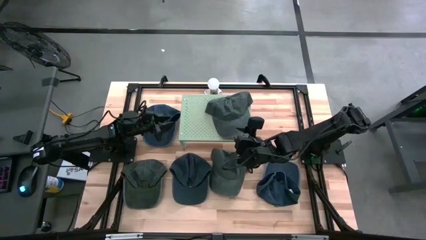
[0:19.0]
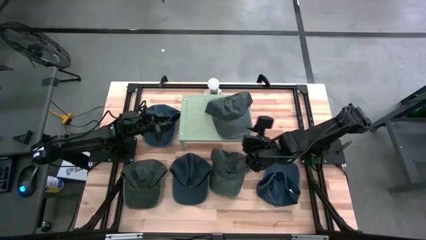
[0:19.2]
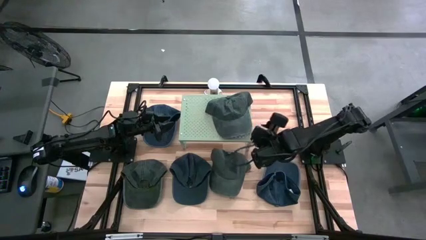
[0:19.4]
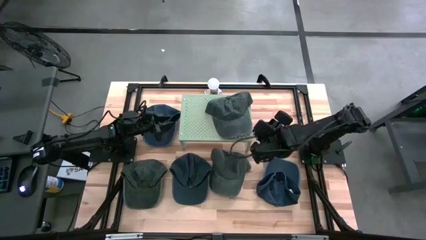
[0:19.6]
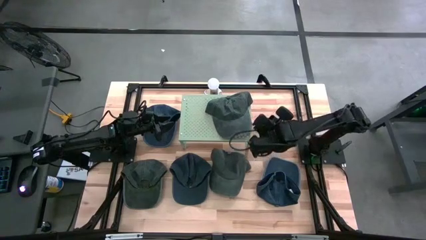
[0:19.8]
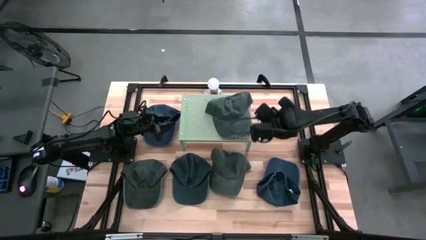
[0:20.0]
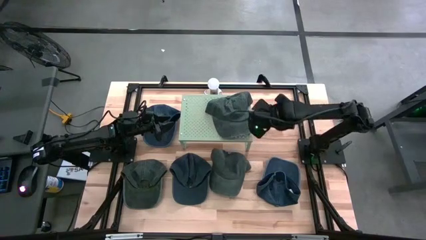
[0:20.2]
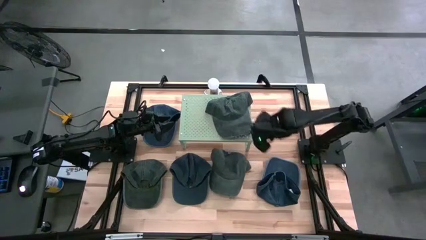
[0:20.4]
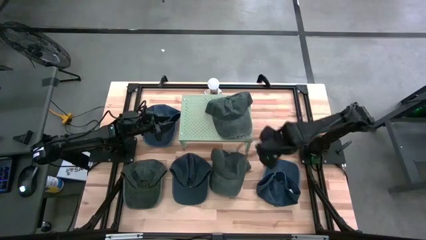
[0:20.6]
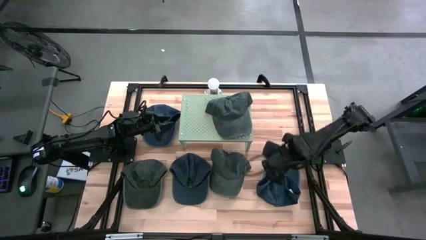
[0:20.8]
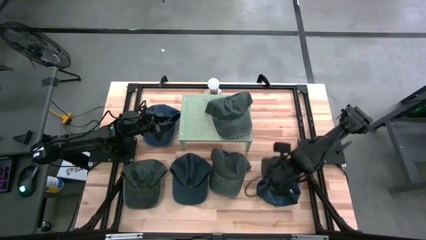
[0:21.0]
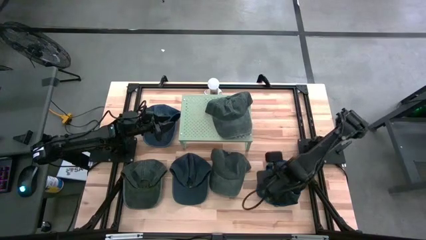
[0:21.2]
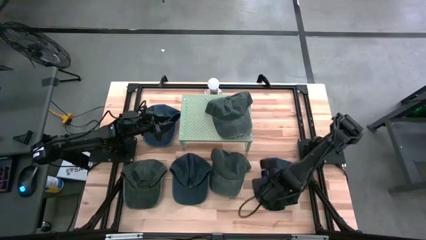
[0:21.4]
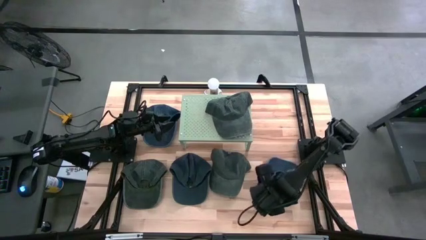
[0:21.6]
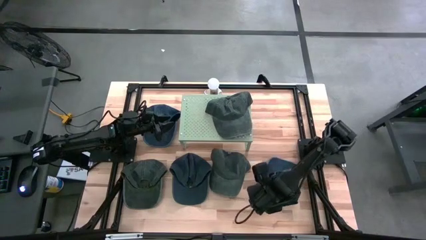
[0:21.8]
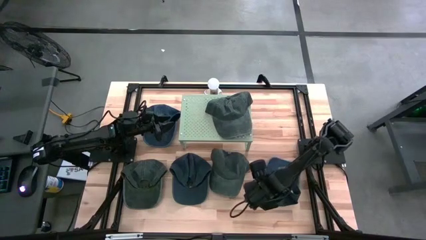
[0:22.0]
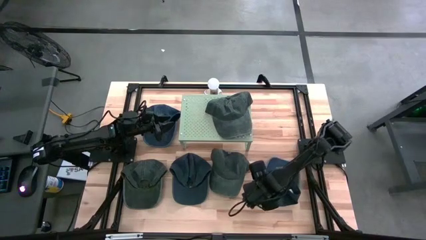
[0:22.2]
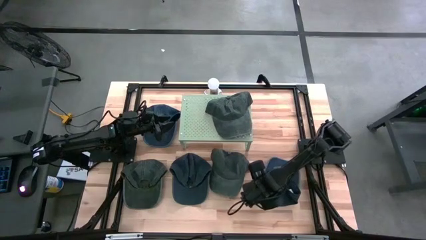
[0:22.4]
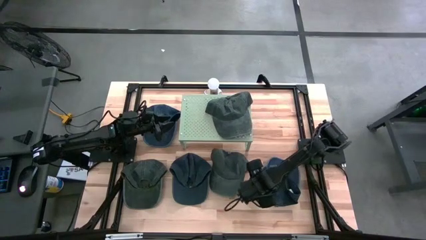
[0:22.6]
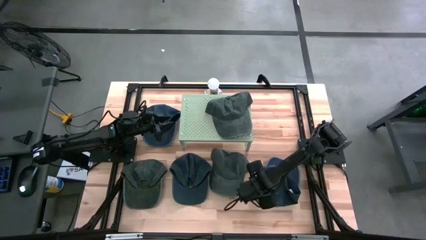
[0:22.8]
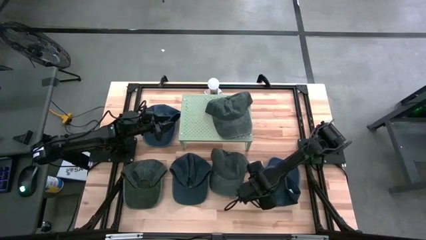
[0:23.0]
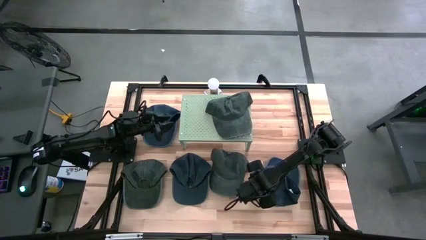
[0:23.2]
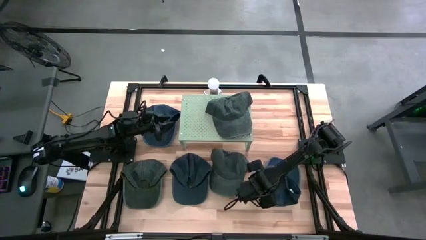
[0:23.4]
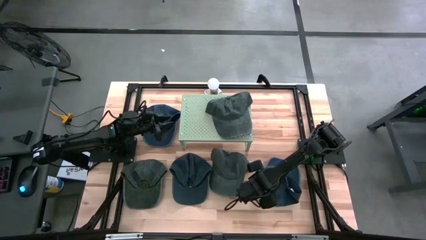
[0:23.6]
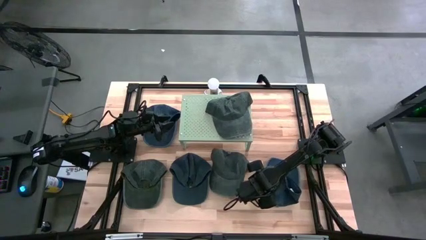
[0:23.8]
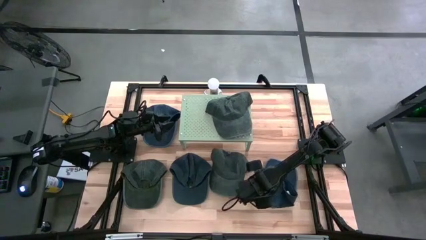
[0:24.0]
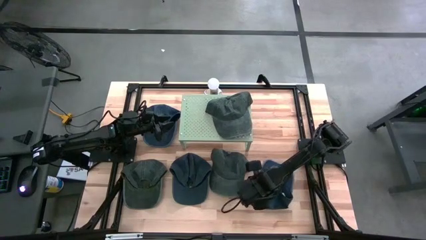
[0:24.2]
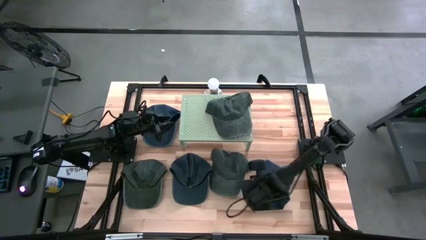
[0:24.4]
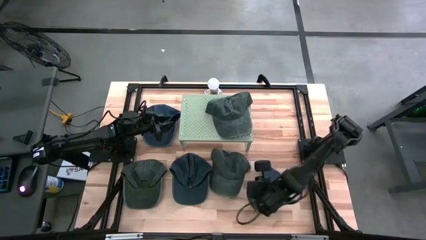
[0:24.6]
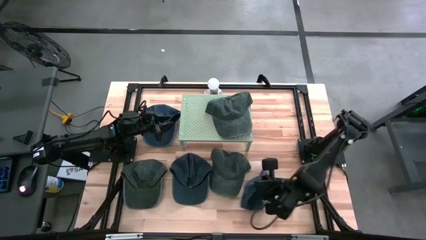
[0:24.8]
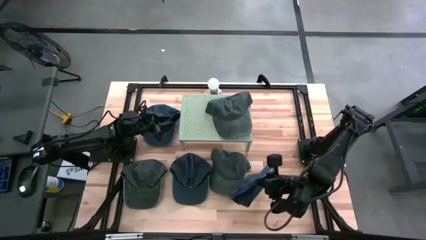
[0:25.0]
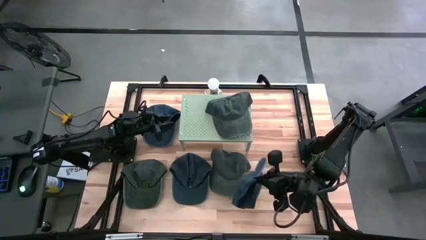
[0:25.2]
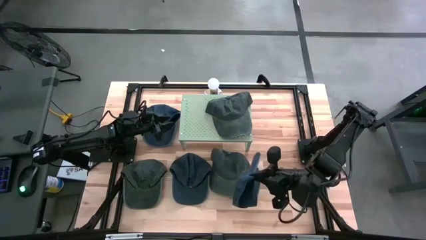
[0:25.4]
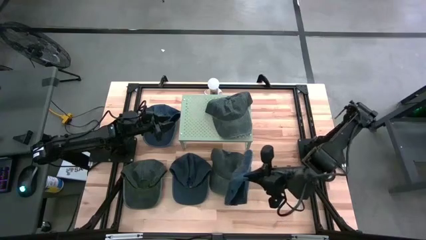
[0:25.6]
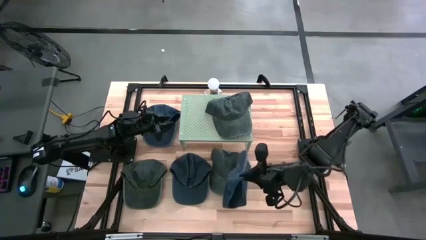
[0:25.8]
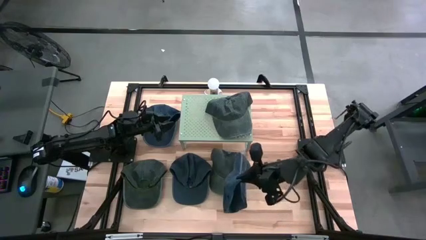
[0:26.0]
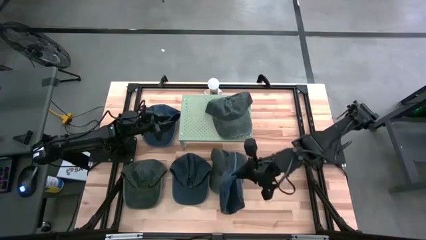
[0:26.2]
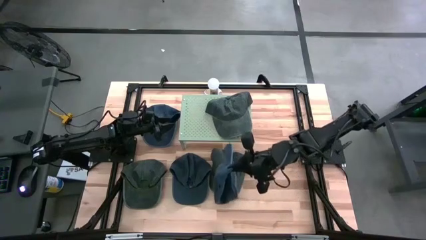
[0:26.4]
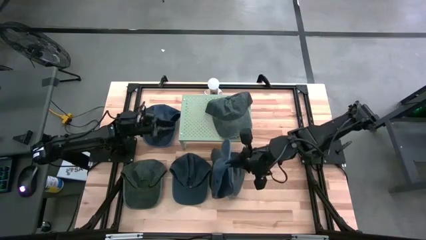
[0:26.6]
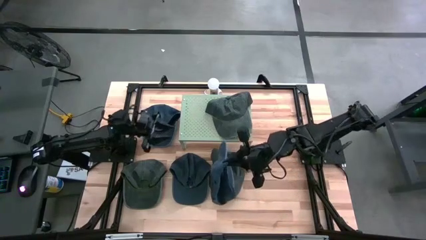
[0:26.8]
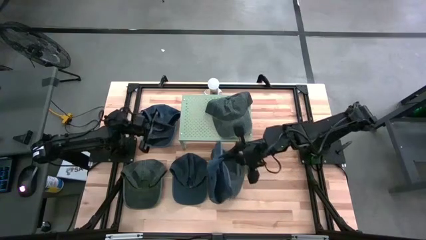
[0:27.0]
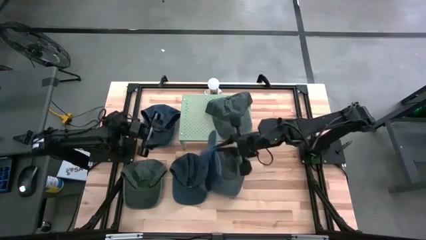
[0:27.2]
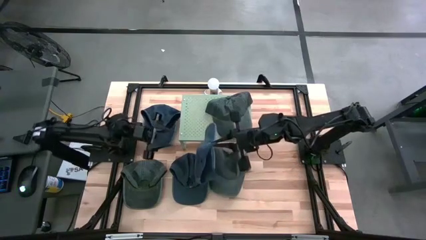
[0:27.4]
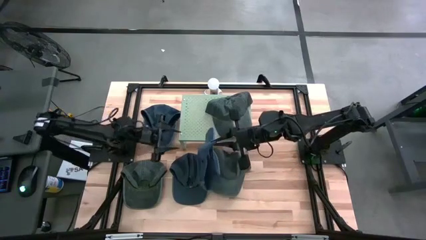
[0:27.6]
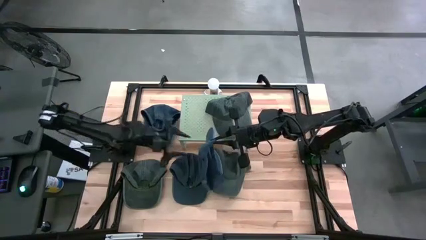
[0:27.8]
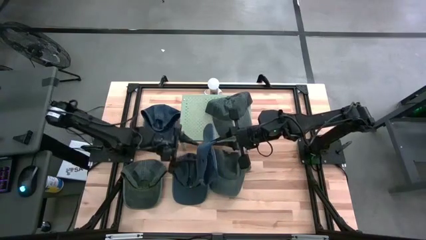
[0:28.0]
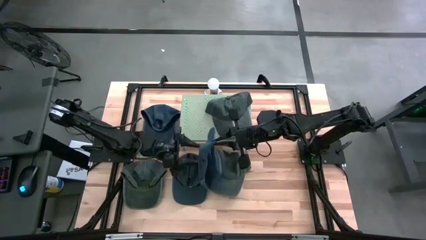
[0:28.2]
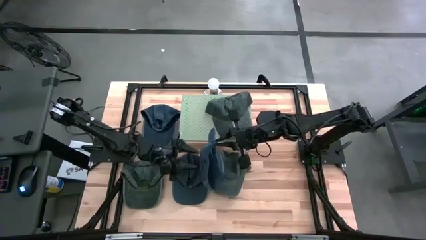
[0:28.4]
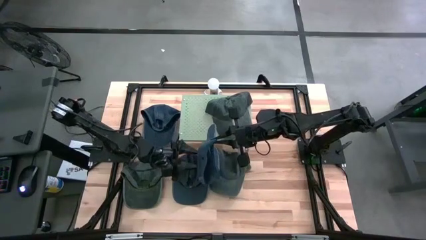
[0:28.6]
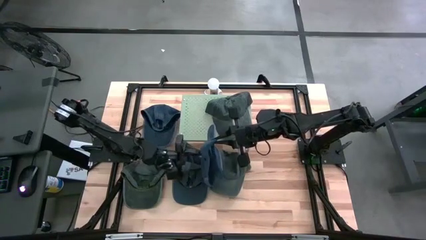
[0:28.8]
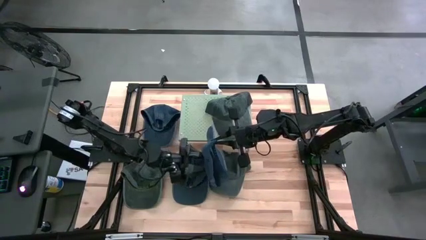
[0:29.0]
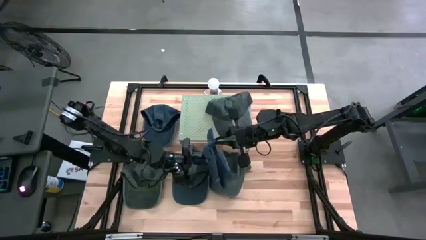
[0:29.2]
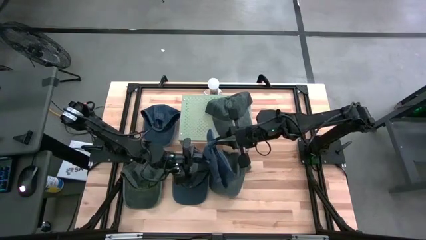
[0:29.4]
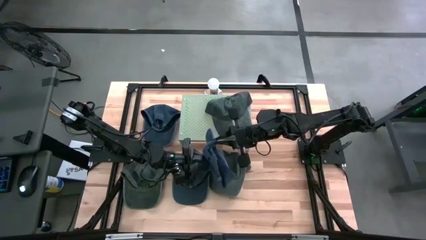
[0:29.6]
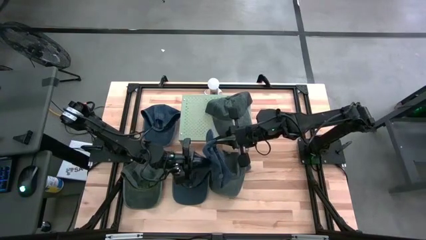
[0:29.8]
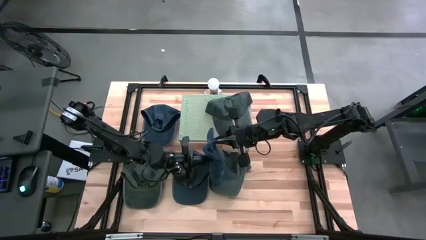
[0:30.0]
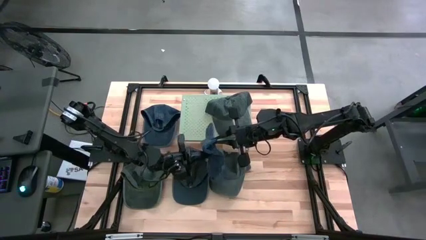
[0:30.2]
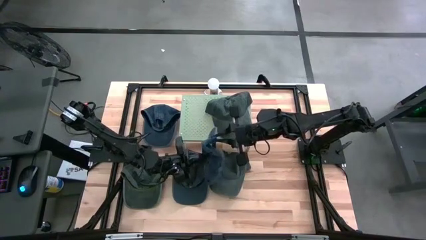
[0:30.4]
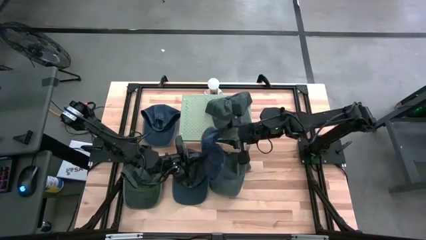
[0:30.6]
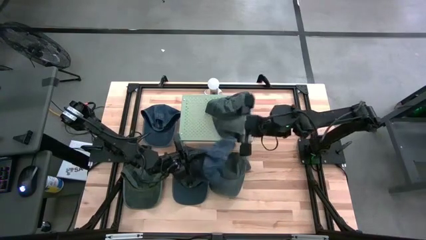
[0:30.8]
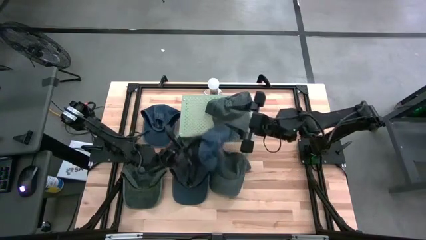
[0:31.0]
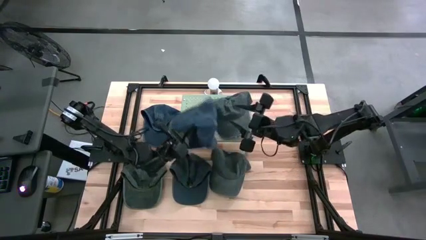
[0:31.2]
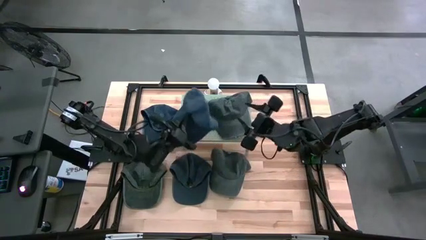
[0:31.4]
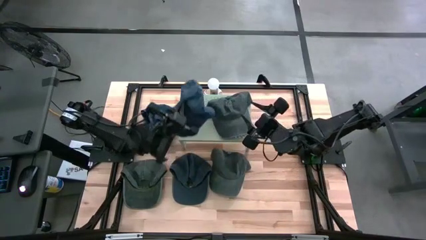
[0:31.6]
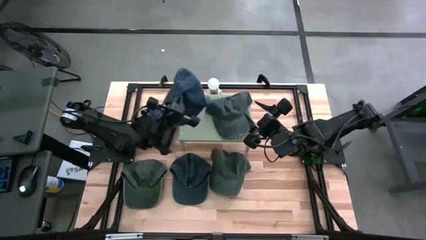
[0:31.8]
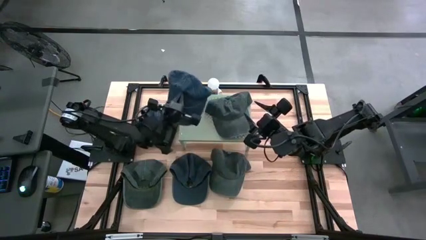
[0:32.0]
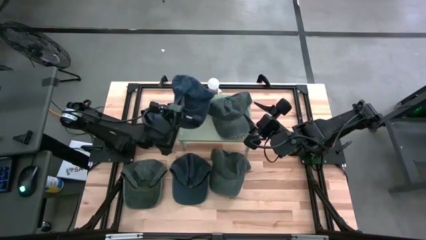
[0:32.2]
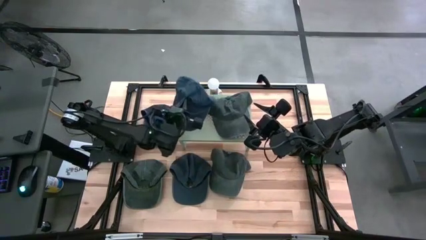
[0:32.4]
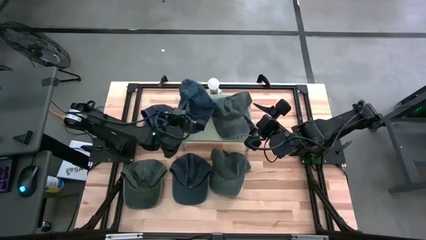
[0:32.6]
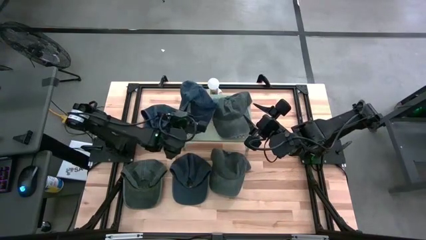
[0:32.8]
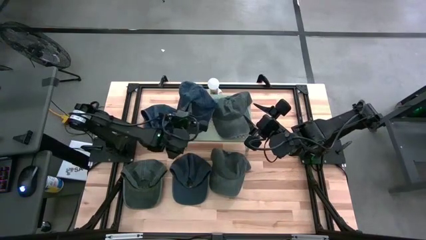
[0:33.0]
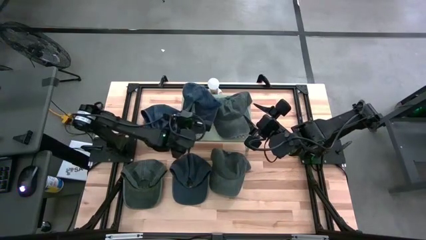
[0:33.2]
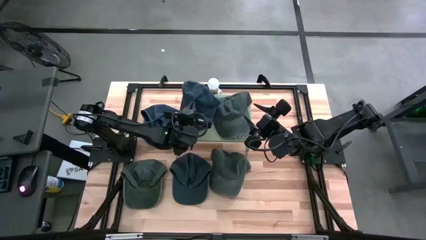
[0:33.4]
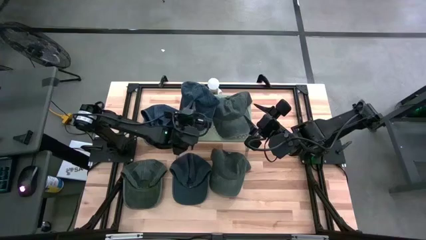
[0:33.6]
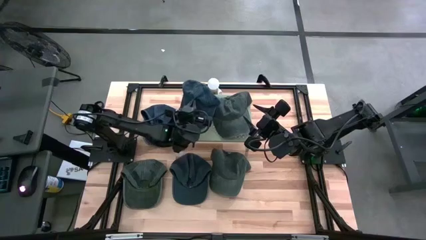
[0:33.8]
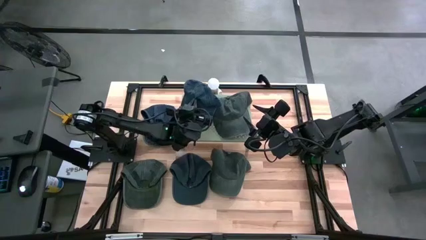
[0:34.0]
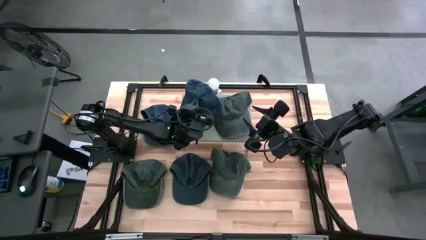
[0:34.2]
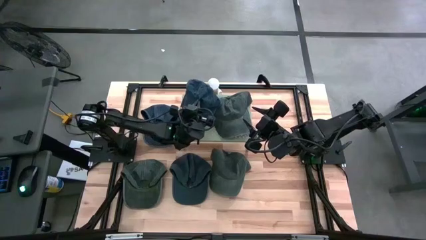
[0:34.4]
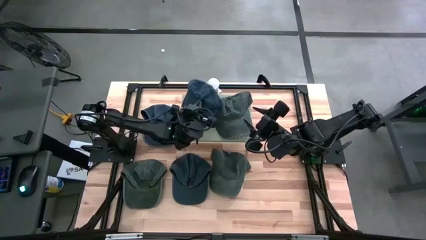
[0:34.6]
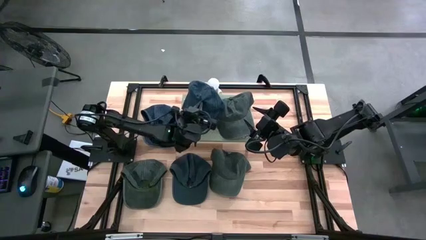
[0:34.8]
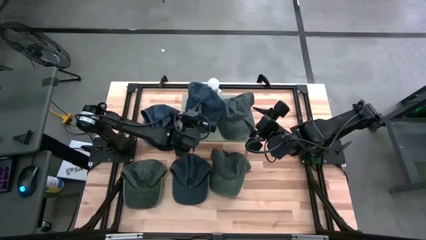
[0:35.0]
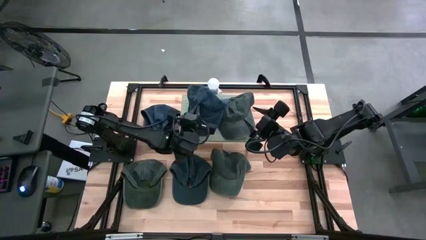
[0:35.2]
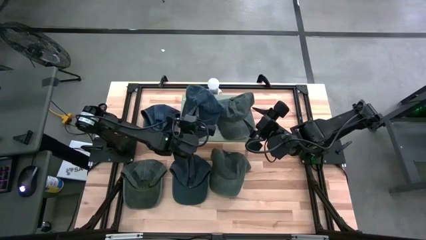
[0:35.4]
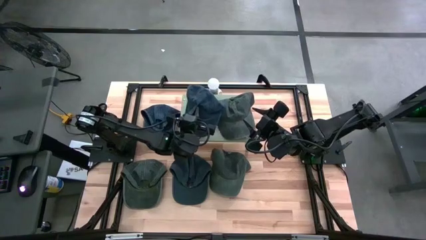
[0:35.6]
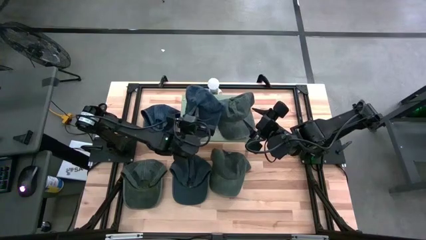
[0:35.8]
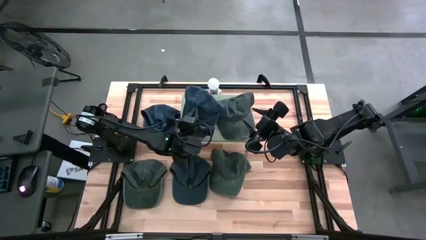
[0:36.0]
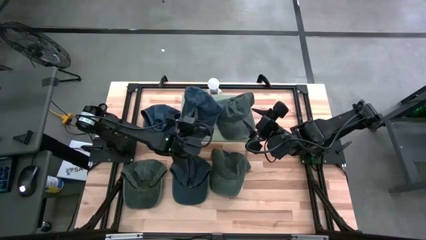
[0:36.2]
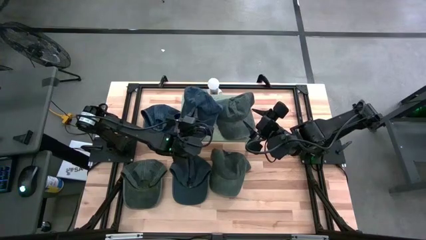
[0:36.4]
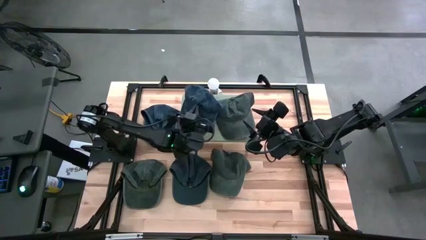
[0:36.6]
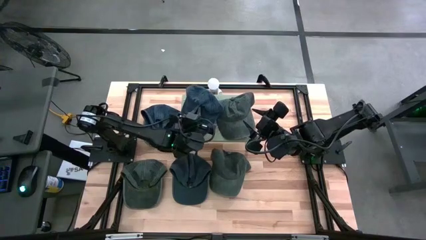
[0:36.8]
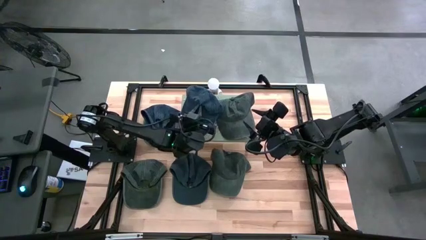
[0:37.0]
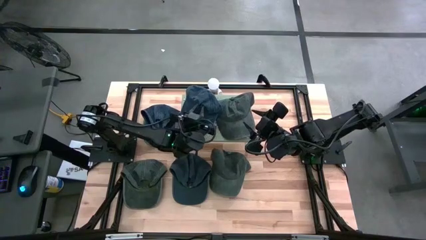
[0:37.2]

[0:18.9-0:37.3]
Task: Pick & Place hat
Put the bottom right dark blue cap on the shelf
